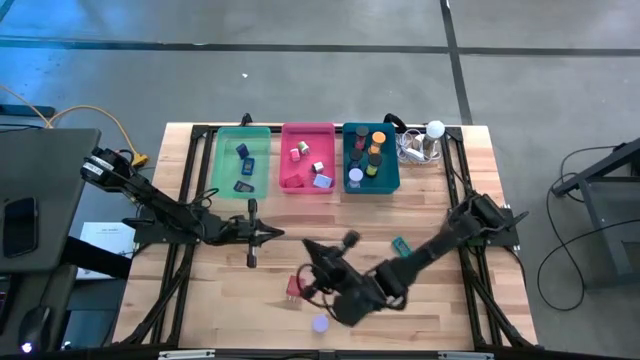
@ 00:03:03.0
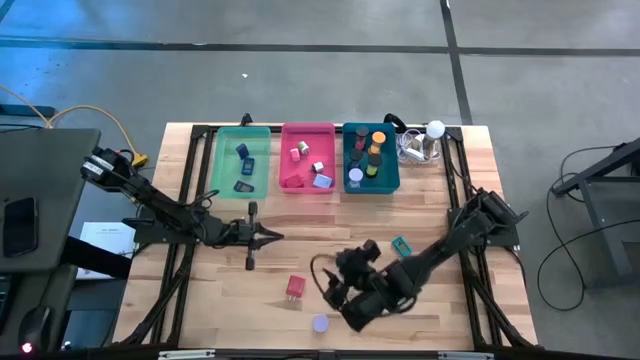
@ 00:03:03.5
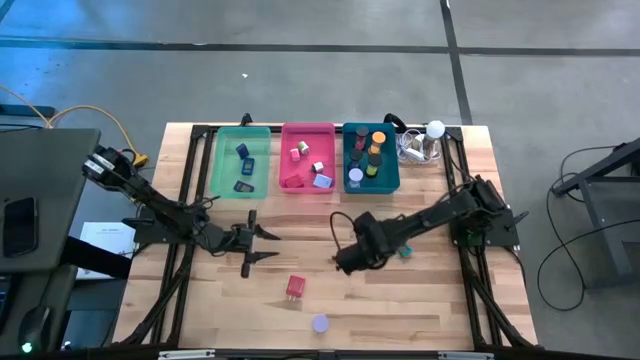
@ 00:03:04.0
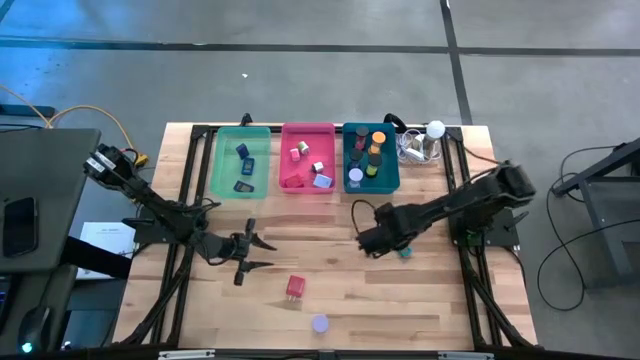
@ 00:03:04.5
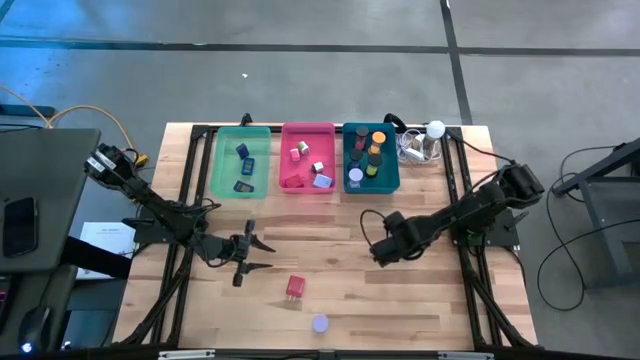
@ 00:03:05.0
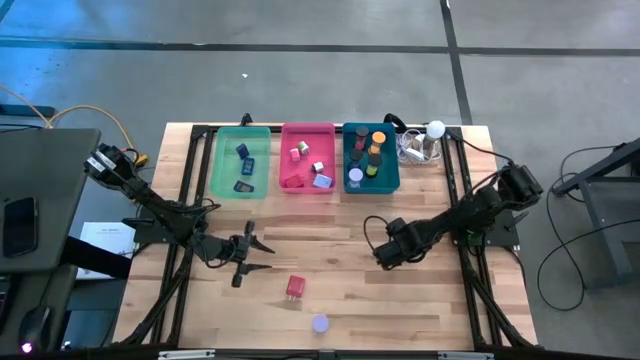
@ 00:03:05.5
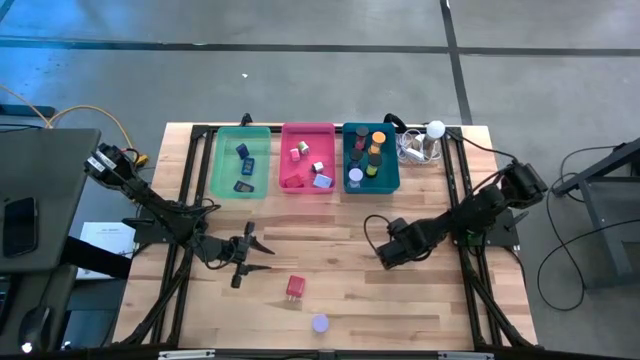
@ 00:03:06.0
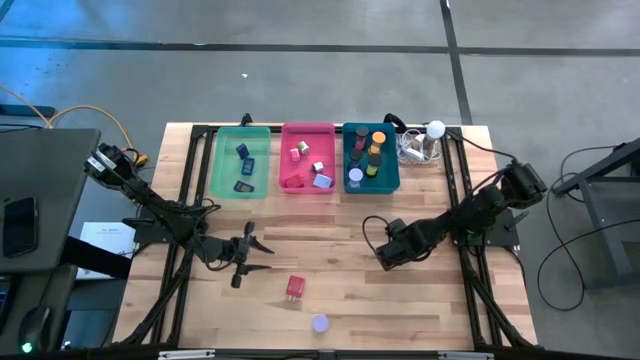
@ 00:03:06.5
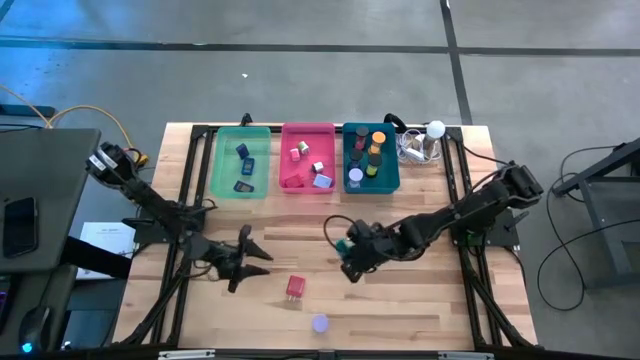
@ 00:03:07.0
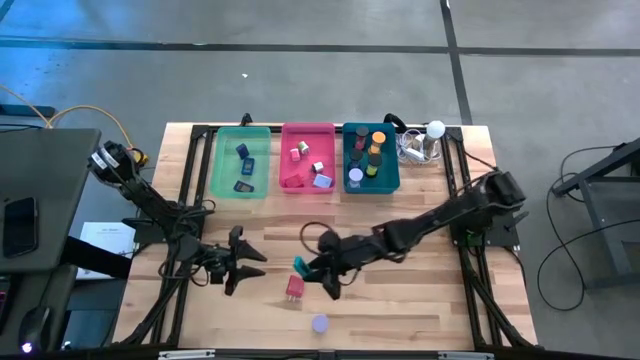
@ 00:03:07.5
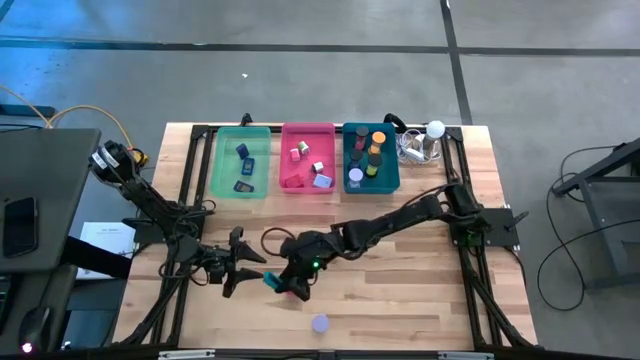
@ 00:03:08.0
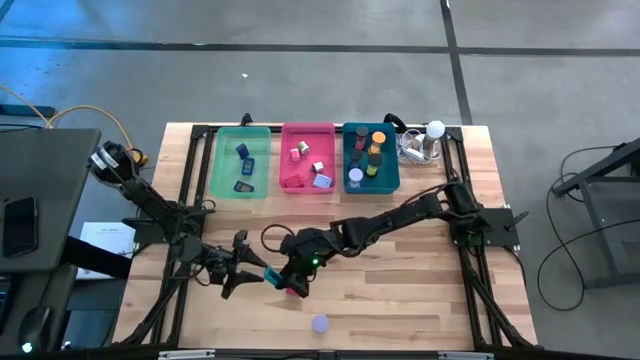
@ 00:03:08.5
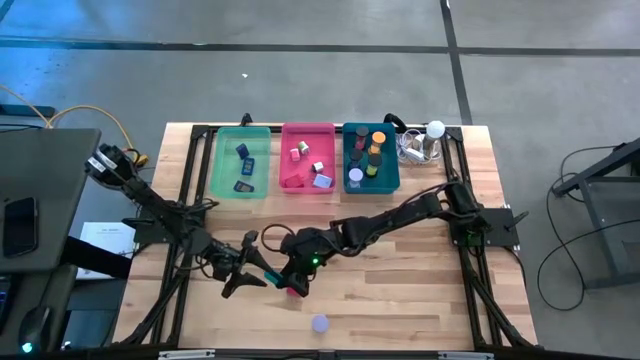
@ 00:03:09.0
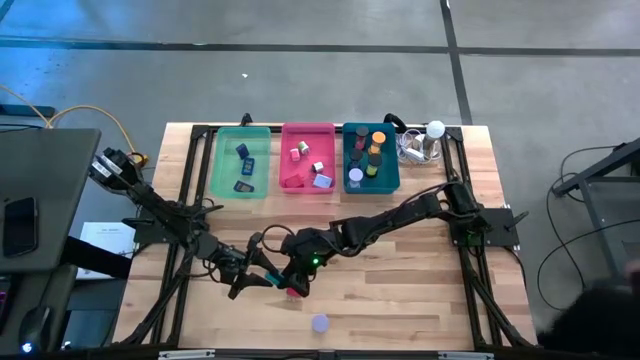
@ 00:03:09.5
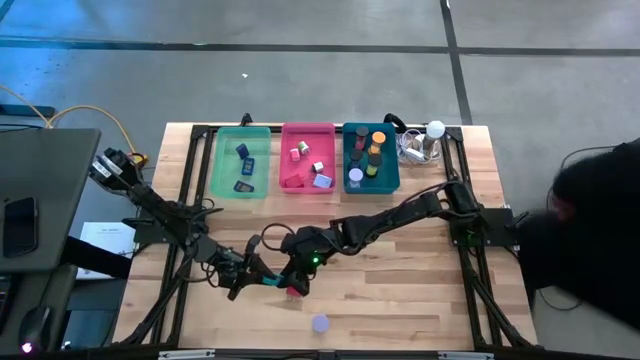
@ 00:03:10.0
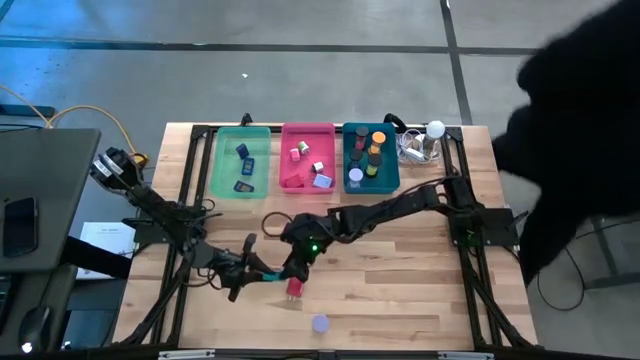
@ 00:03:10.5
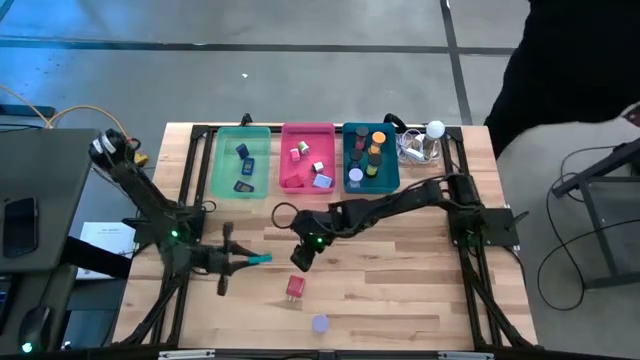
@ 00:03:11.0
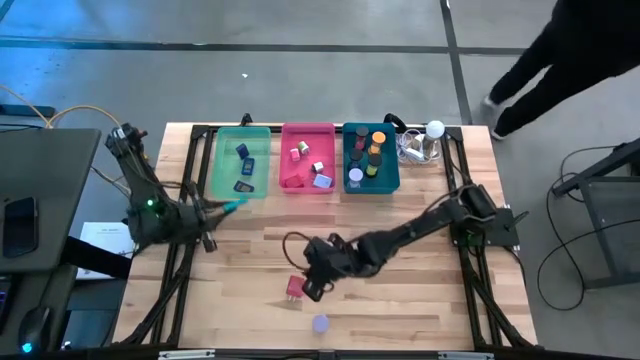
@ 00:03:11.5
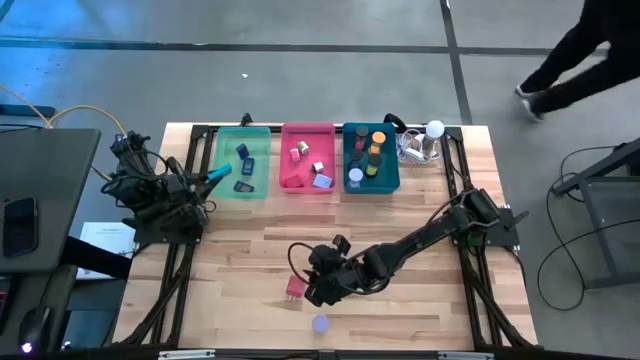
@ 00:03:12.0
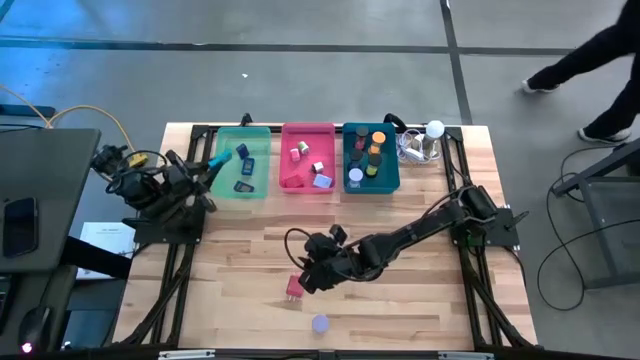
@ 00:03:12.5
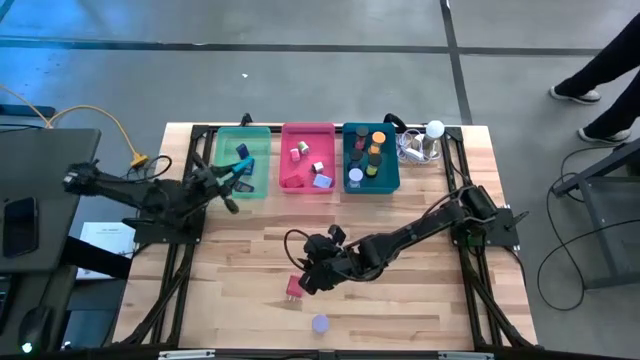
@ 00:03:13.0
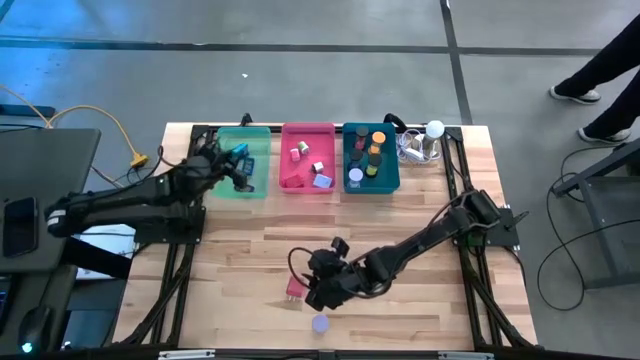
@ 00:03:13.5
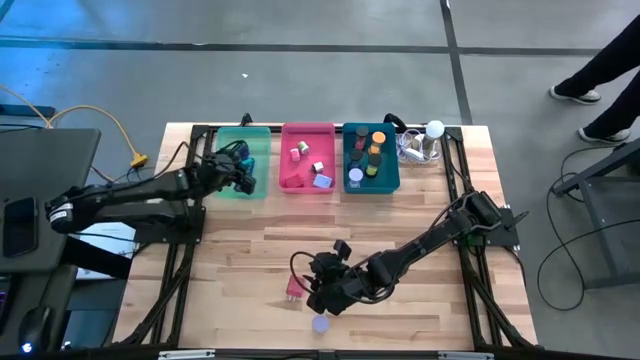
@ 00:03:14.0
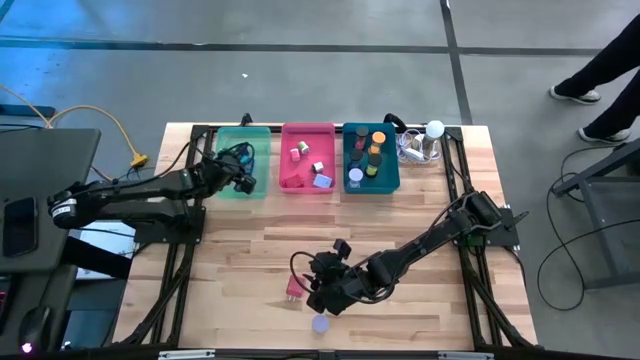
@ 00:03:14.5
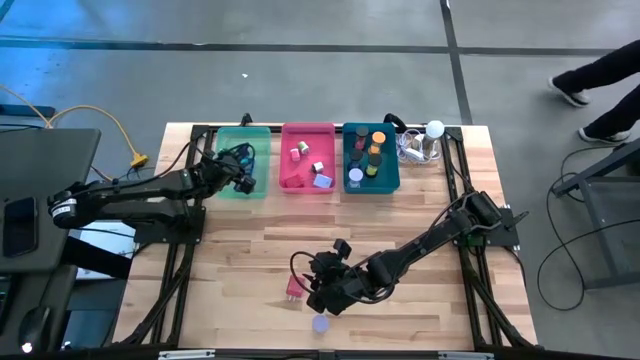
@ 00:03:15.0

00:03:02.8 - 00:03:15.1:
Task: Pick & Place Office items
Put the blue digital timer into the green bin

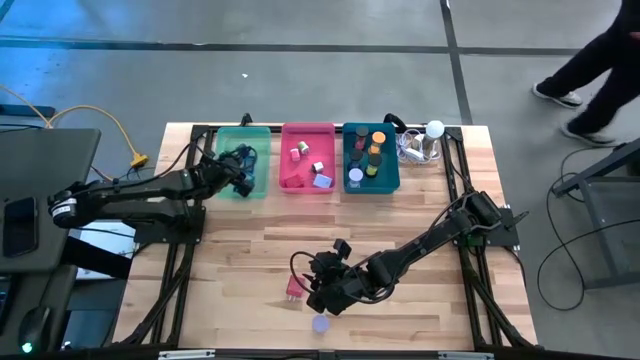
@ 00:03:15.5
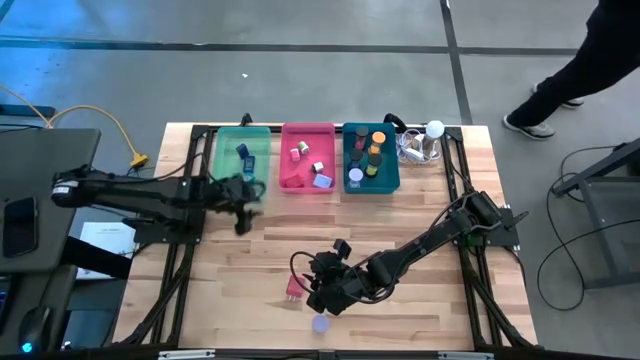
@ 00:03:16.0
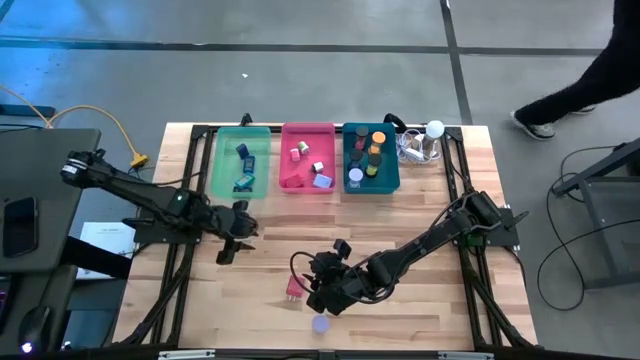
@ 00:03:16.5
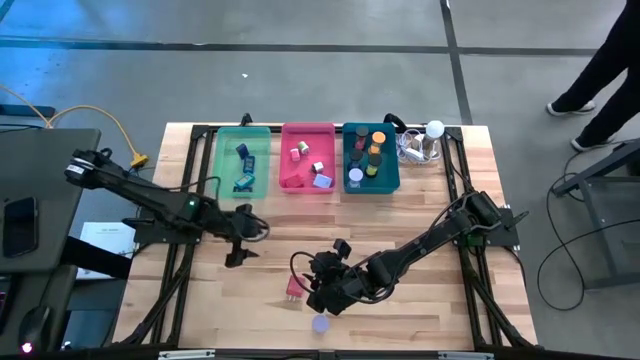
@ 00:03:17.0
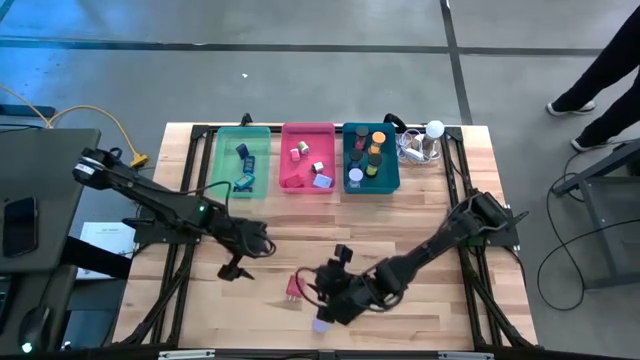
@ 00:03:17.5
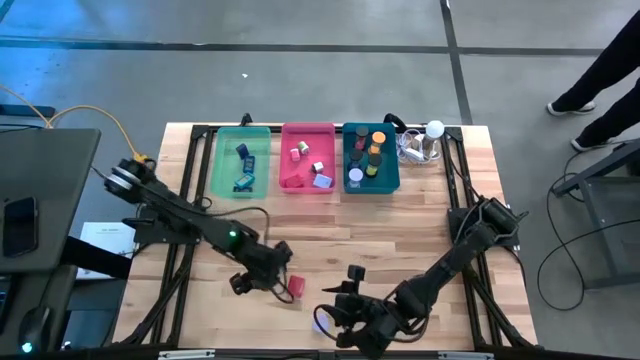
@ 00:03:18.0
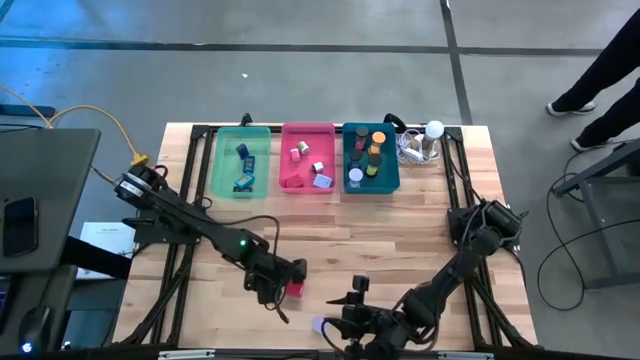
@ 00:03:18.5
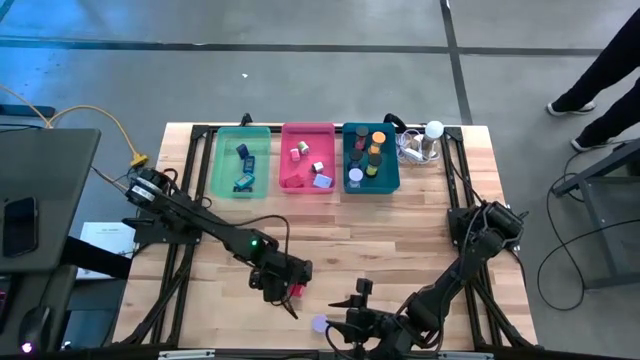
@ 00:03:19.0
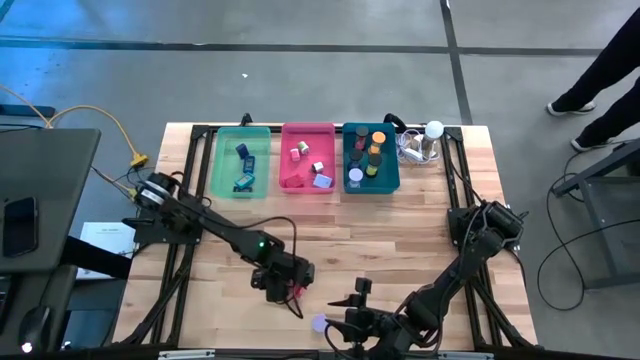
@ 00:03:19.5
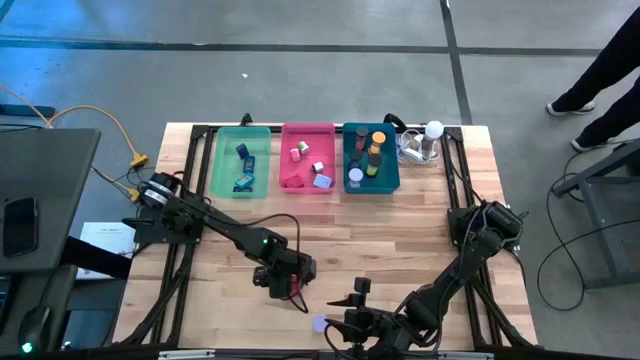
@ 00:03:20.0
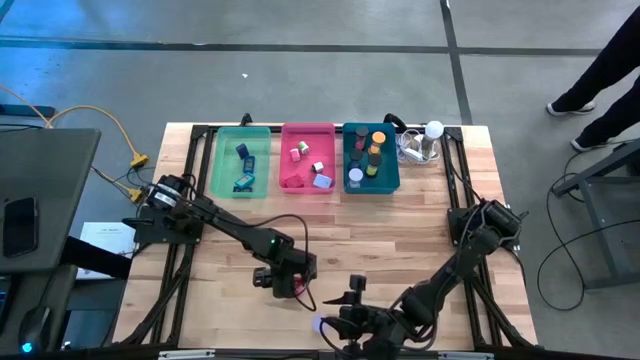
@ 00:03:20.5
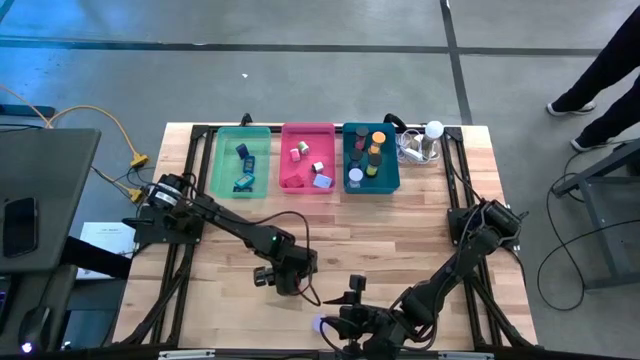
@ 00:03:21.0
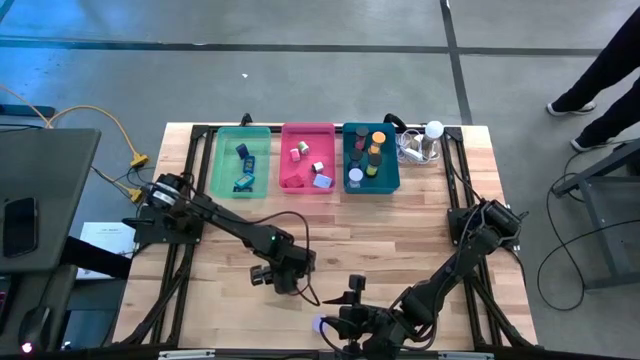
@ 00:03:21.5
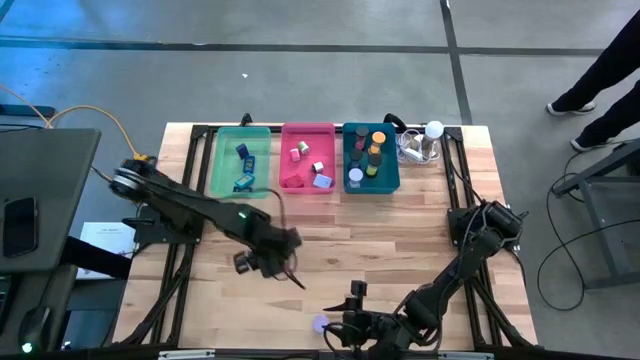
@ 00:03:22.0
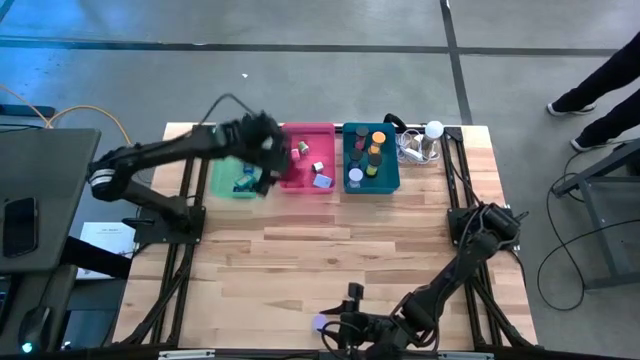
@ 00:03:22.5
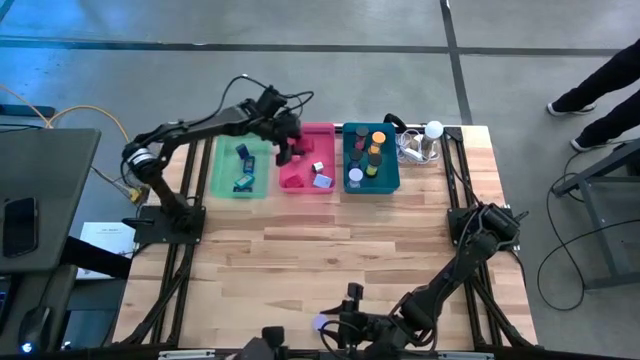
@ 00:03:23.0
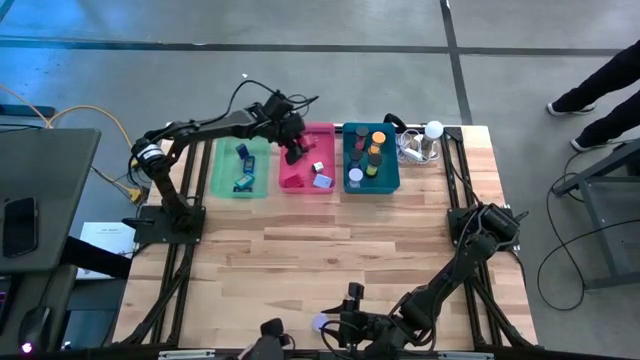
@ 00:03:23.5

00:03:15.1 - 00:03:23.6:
Put the red charger adapter into the red bin
